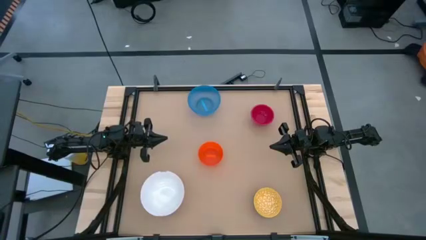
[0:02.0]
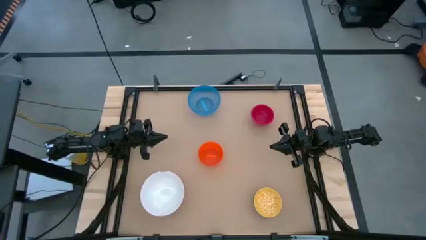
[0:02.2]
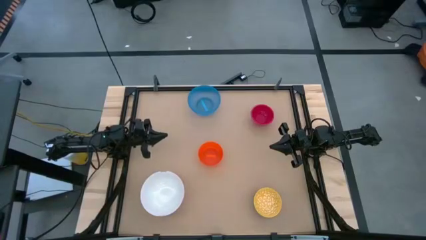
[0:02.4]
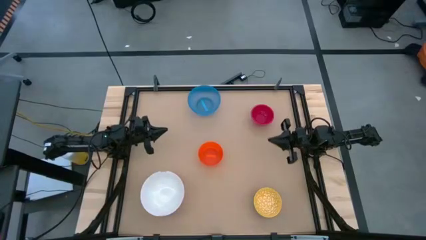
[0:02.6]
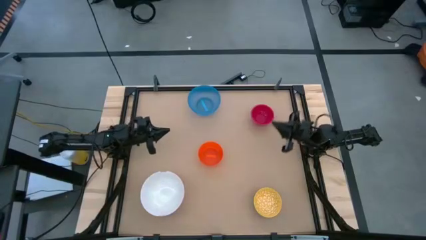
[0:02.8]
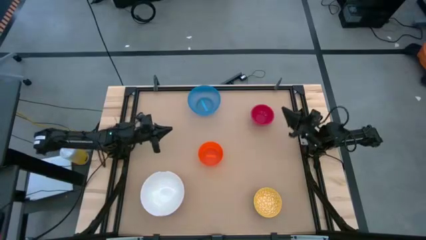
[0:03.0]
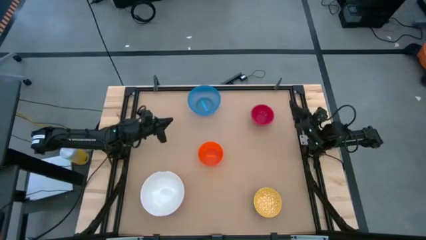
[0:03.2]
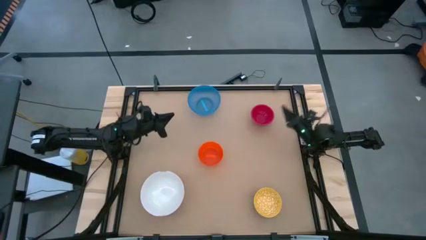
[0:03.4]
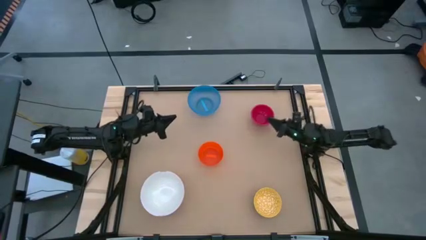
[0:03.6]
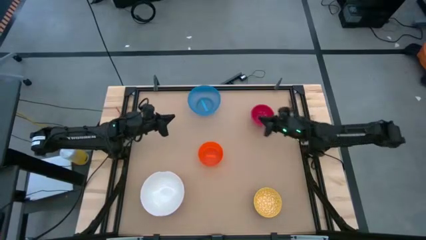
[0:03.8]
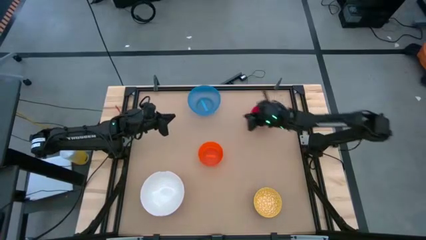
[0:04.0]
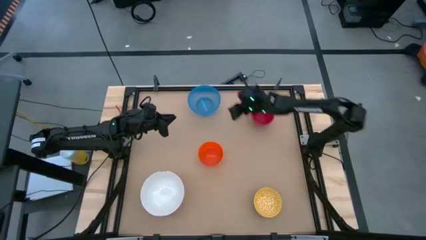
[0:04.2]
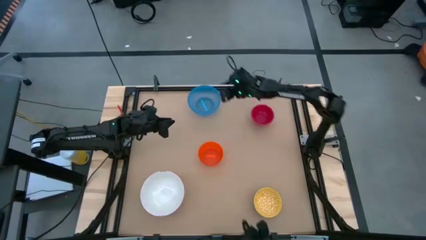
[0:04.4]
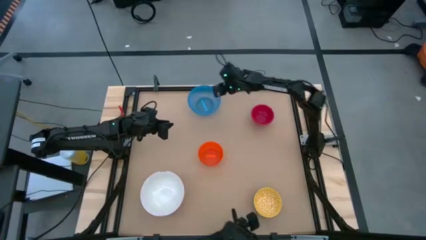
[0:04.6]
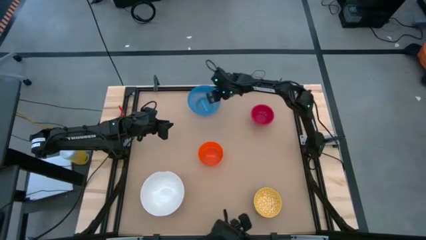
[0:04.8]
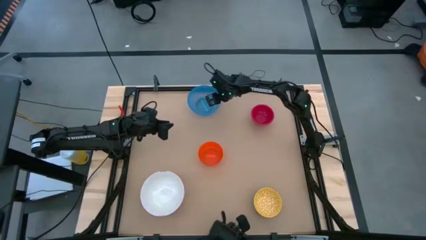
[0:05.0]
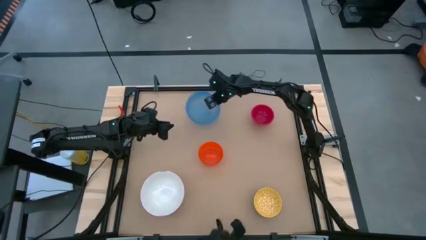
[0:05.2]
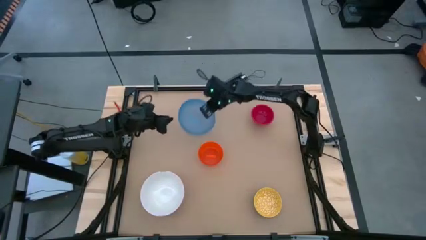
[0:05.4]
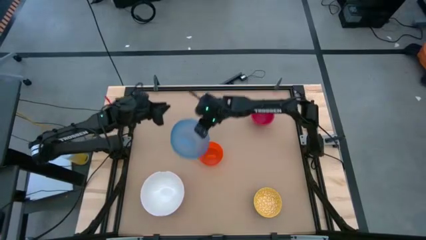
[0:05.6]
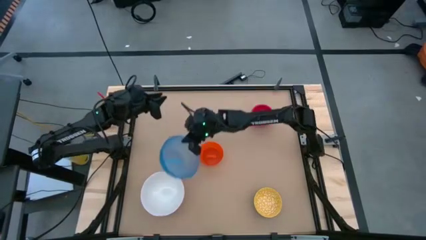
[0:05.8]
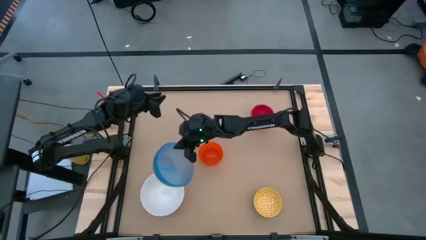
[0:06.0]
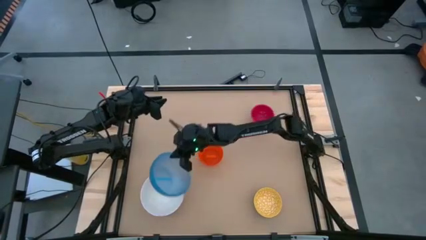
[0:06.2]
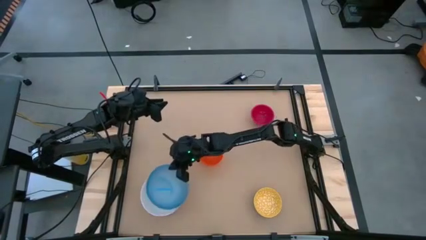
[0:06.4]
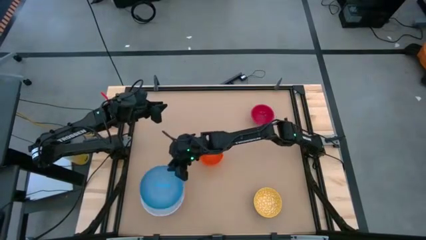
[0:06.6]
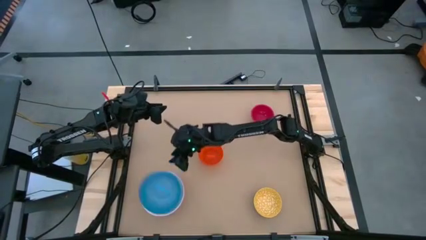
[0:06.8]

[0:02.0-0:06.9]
Stack the blue bowl on top of the white bowl

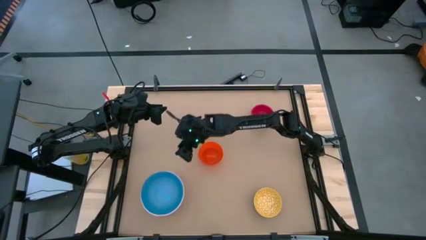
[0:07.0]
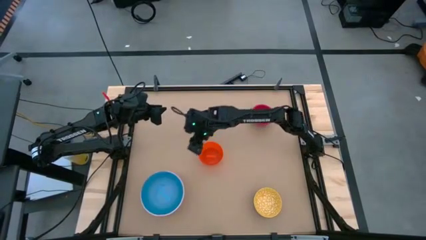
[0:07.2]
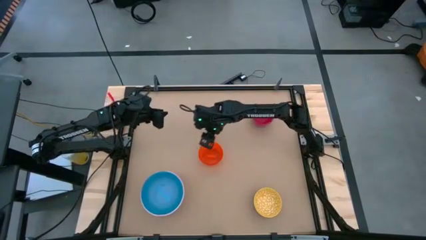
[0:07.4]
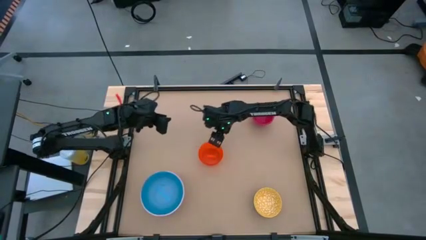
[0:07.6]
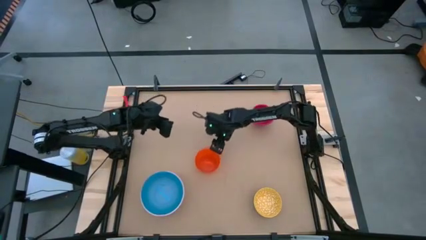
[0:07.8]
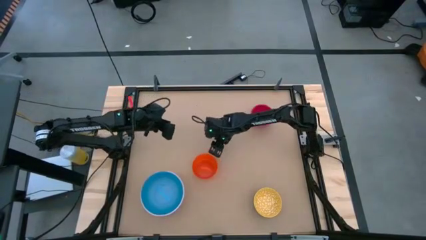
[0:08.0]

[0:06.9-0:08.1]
Stack the orange bowl on top of the blue bowl

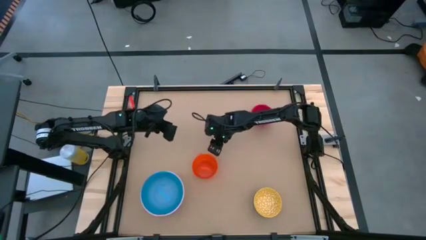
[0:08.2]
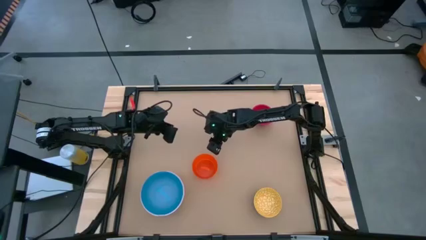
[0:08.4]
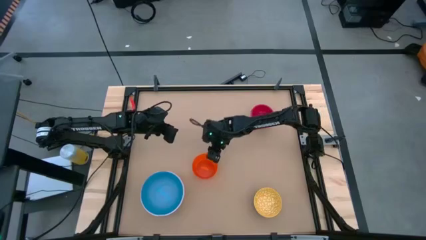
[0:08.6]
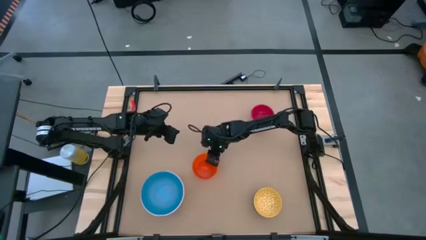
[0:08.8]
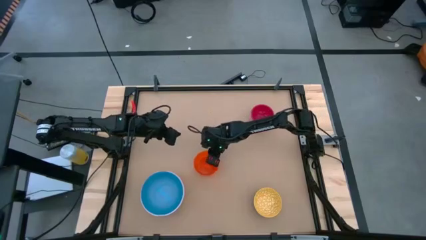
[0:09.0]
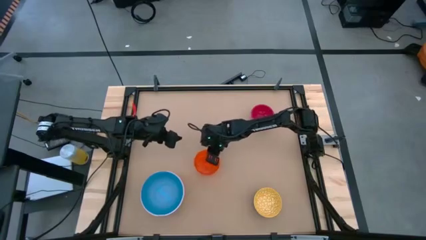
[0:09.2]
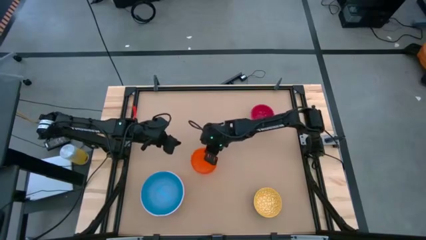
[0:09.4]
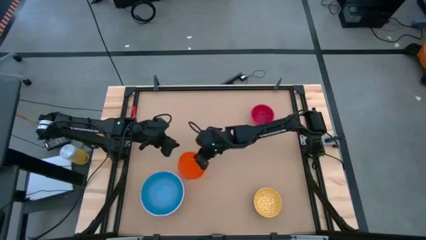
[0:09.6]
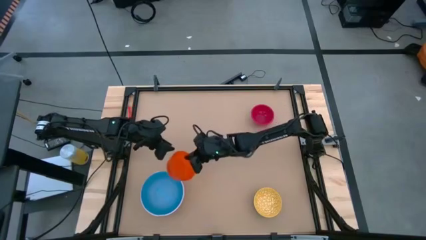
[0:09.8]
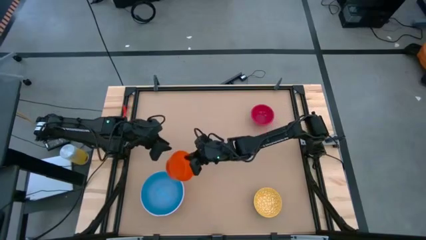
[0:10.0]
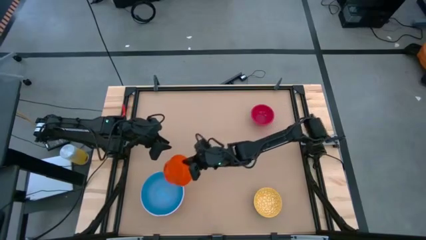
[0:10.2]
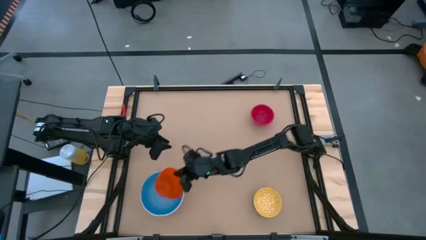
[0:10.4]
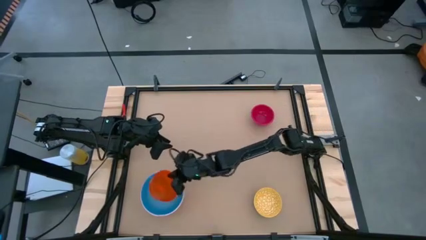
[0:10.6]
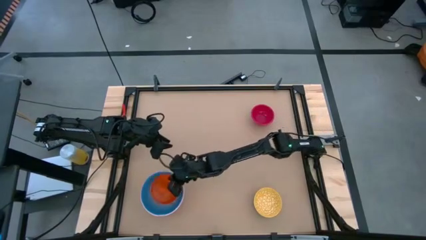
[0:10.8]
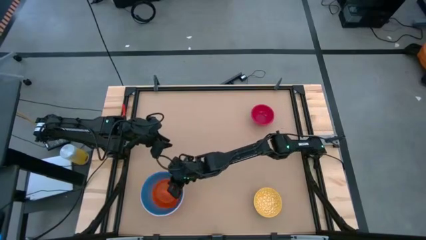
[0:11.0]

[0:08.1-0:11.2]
Stack the orange bowl on top of the blue bowl

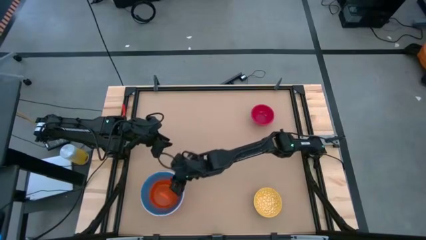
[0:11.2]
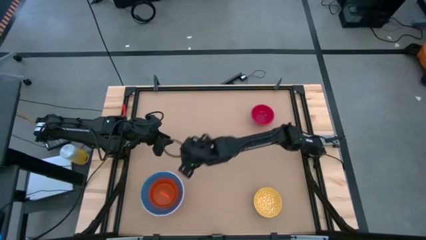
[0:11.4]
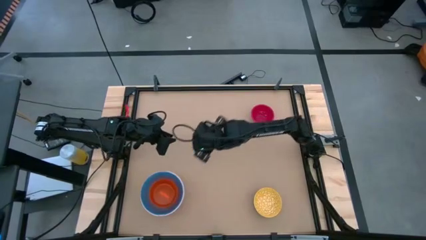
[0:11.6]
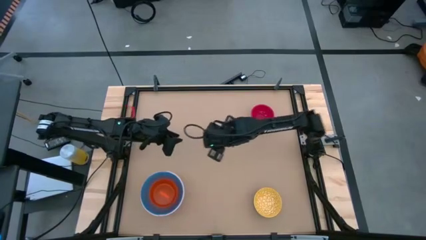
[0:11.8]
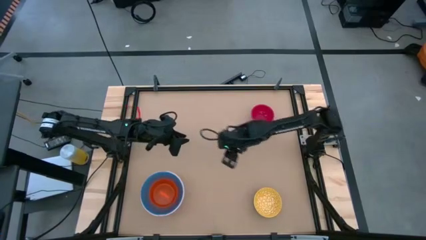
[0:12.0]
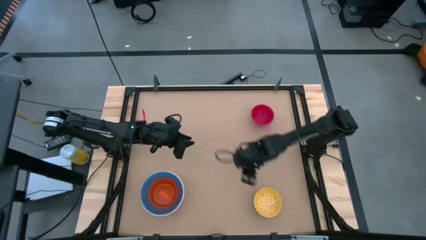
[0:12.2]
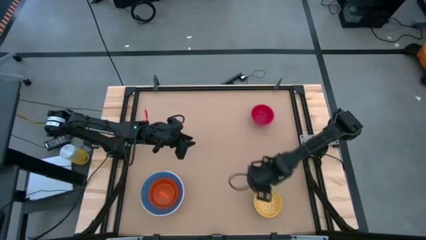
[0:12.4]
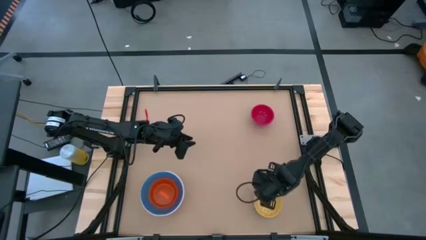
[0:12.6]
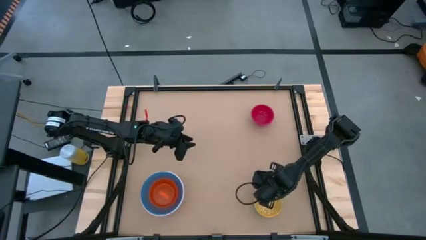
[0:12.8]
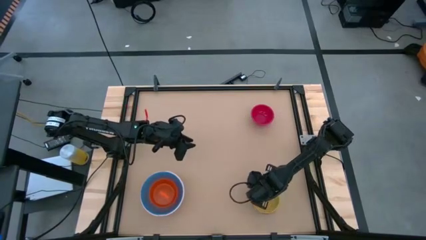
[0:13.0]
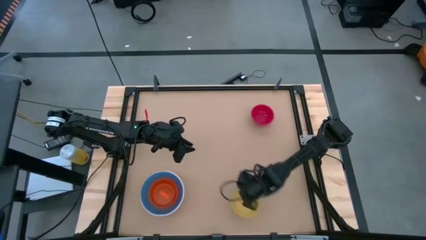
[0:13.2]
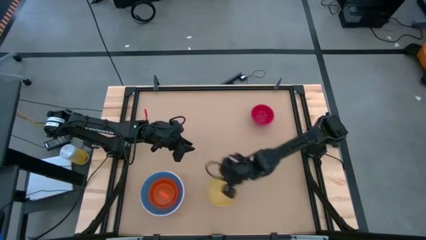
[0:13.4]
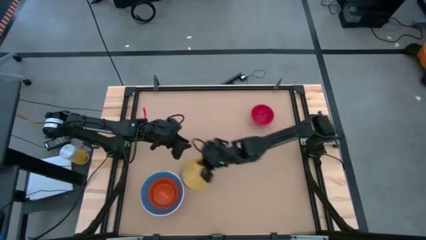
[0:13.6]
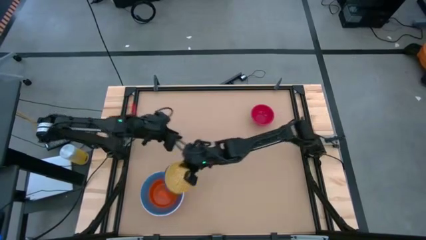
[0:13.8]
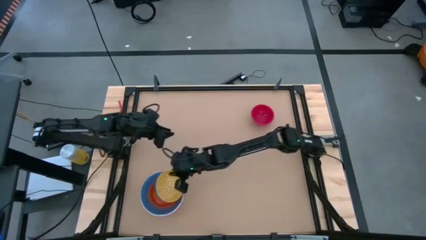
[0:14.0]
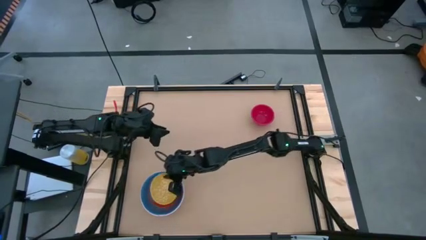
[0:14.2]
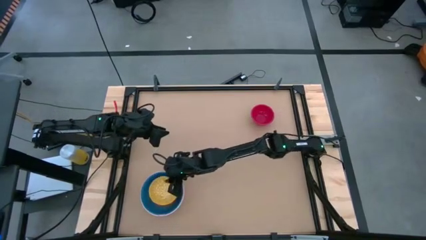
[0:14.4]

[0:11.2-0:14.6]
Stack the yellow bowl on top of the orange bowl

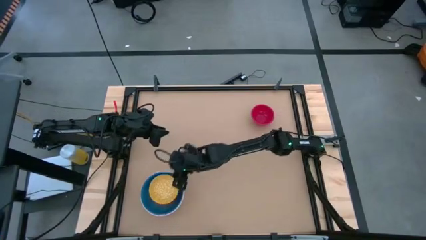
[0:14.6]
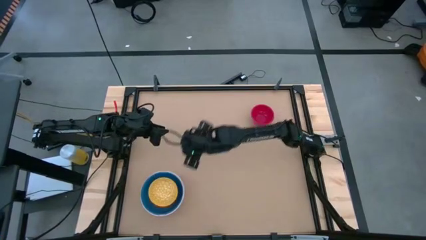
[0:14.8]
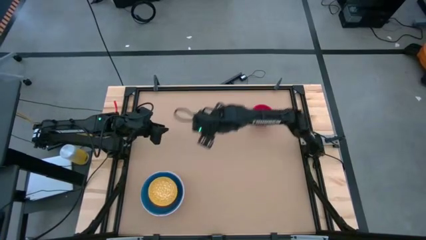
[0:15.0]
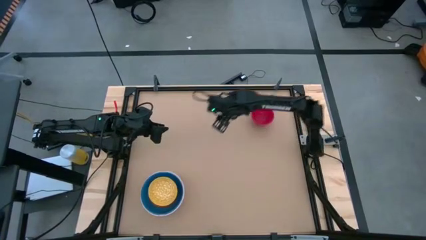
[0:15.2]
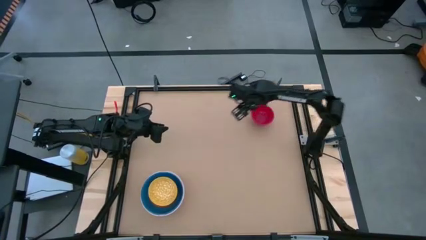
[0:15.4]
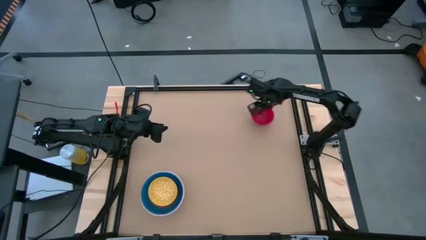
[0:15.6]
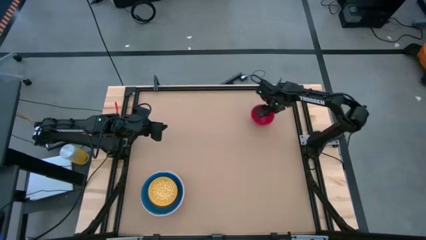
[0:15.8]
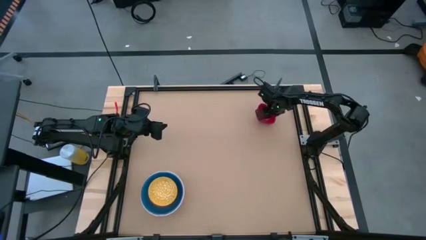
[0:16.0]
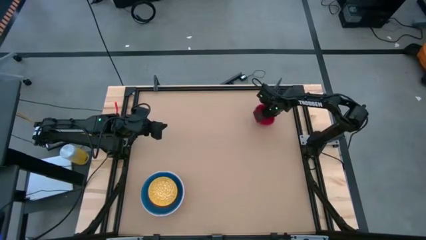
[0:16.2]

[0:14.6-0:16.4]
Stack the pink bowl on top of the yellow bowl

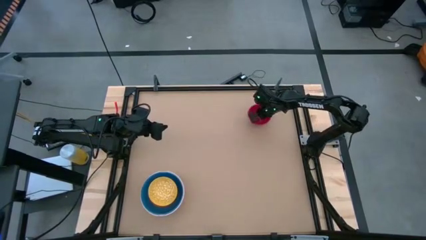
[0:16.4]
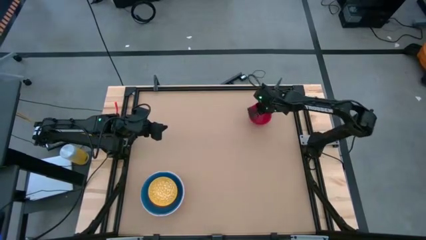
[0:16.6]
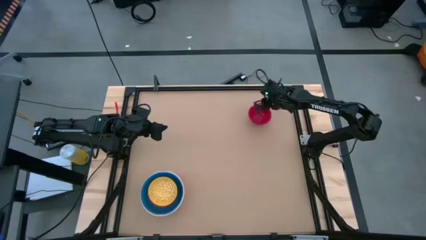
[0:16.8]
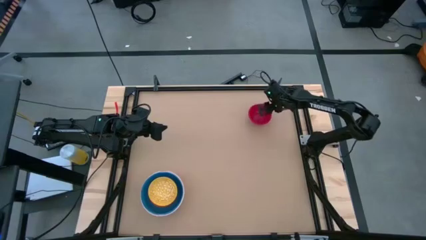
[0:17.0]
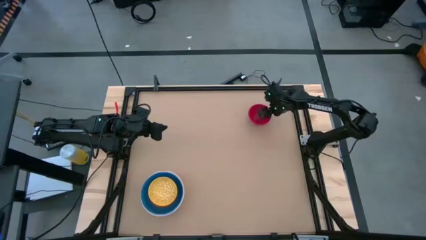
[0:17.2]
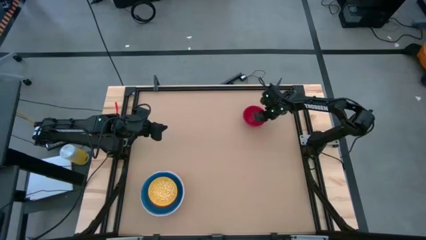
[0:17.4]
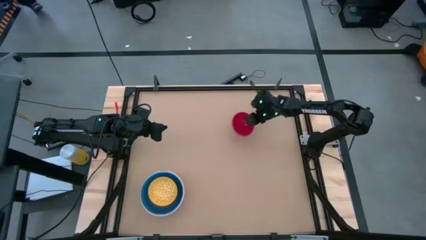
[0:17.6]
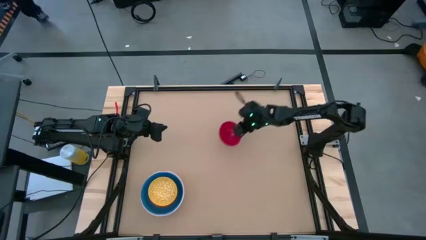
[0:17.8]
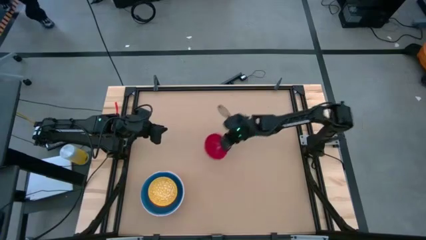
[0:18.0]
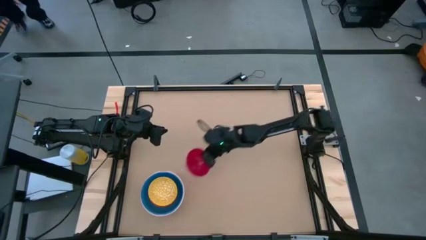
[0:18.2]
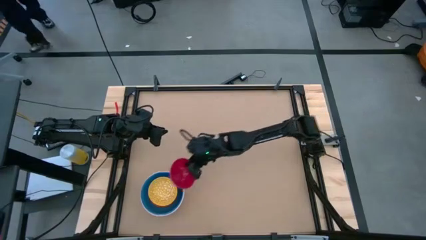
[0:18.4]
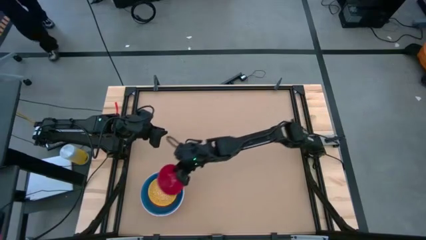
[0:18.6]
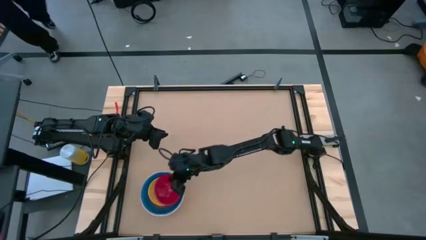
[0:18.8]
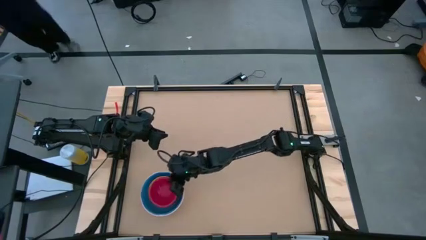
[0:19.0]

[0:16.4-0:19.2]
Stack the pink bowl on top of the yellow bowl
